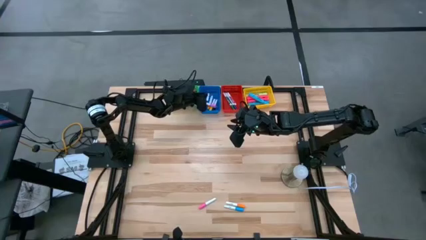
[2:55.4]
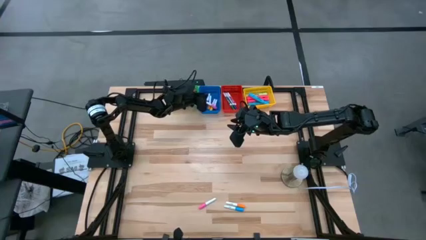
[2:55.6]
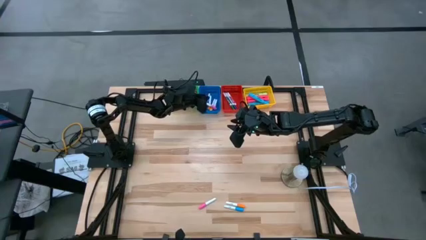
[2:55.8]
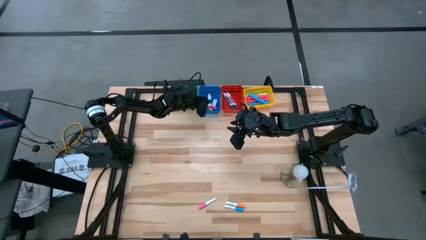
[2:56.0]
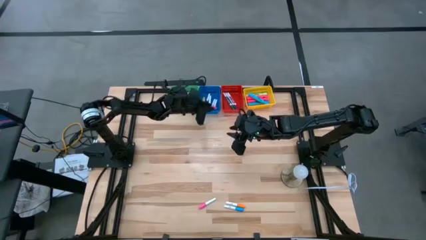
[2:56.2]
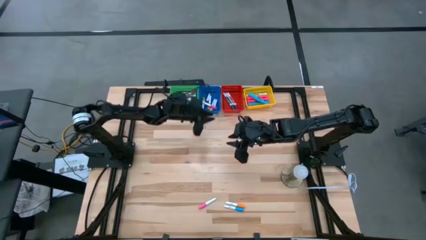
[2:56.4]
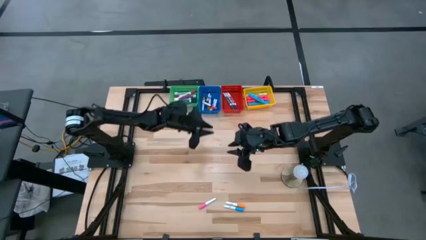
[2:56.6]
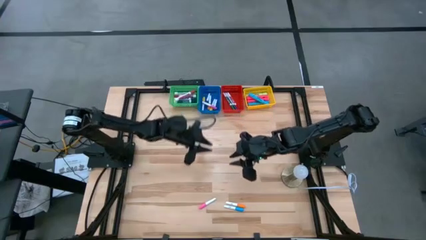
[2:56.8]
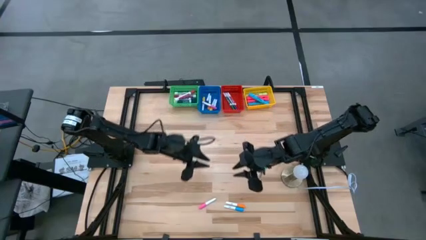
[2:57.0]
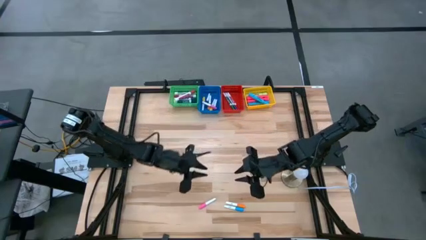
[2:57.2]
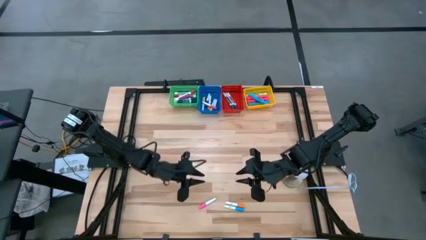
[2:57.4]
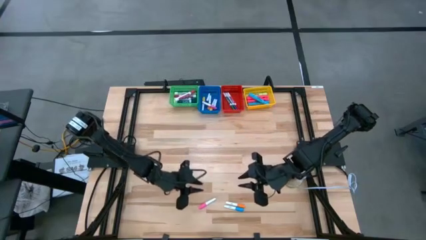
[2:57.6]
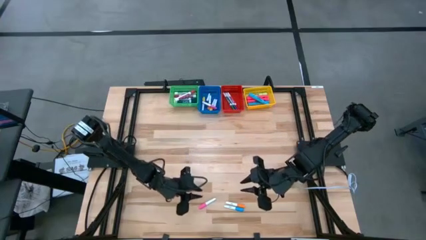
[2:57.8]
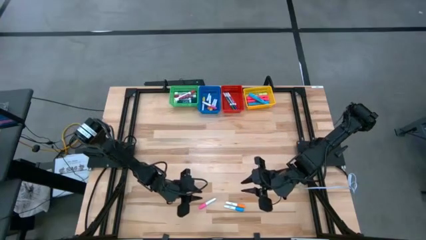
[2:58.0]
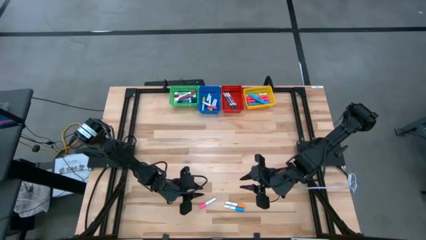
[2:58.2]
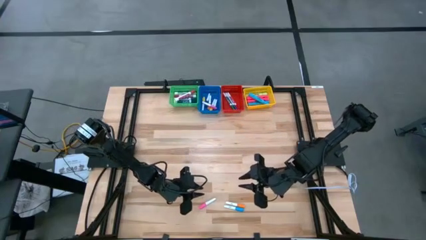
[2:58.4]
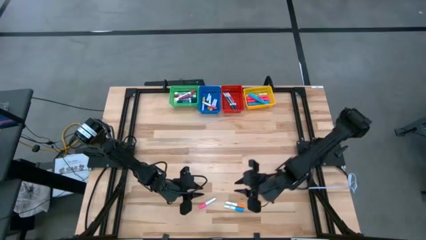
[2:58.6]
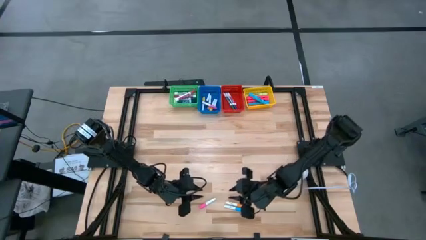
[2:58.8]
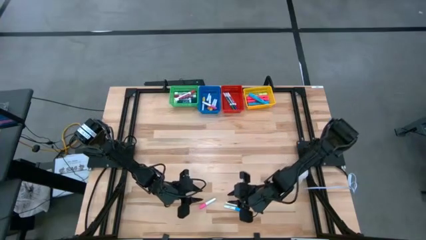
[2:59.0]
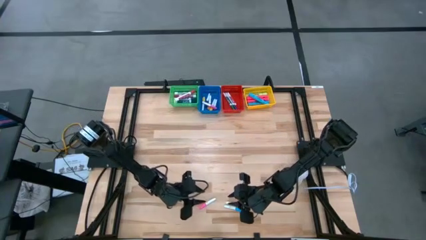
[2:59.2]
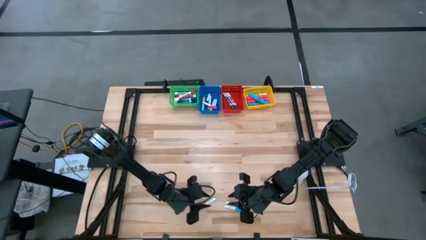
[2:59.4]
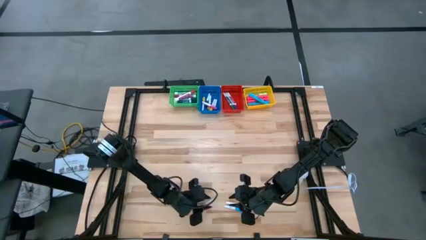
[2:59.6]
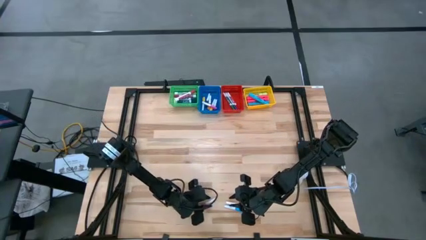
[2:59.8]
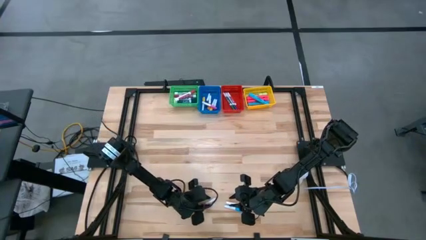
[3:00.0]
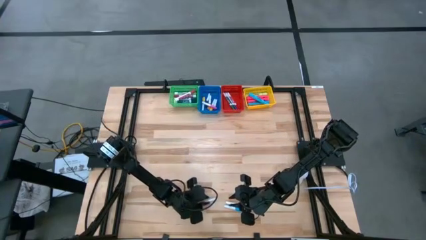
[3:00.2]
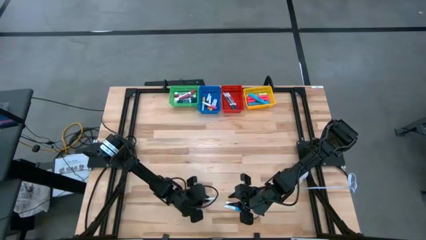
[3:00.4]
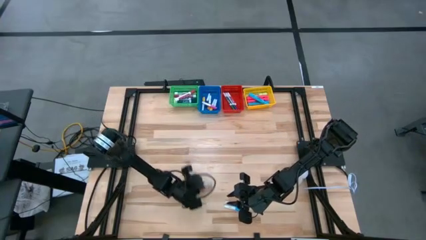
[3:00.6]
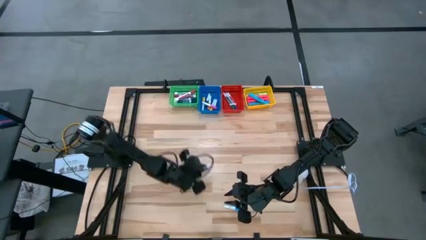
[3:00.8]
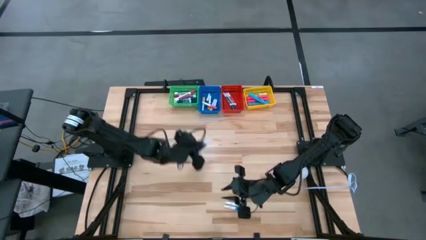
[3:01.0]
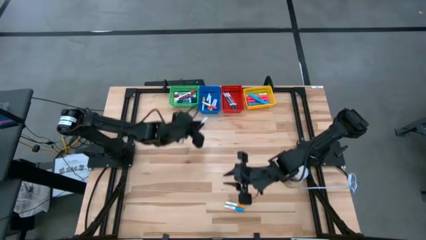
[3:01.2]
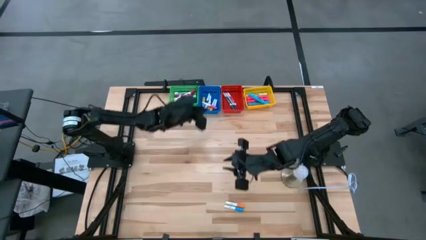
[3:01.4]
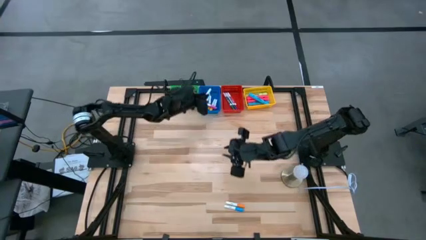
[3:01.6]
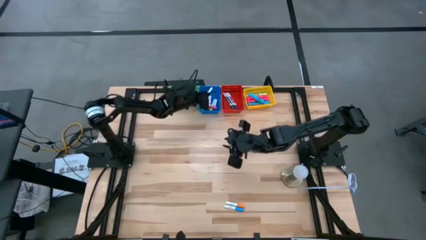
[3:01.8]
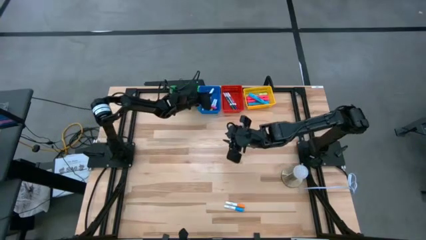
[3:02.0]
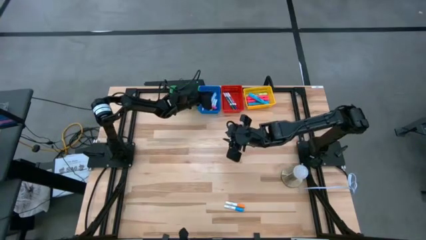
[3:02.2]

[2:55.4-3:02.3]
Task: Pick & Place Markers
Put the small pink highlighter pen into the blue bin

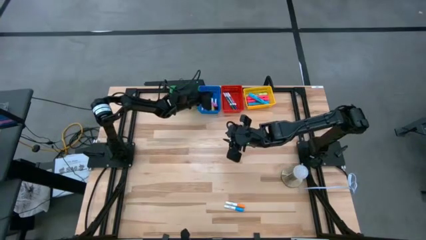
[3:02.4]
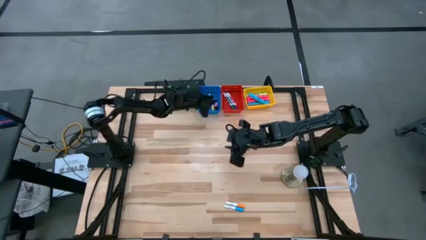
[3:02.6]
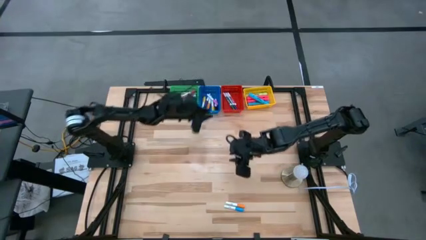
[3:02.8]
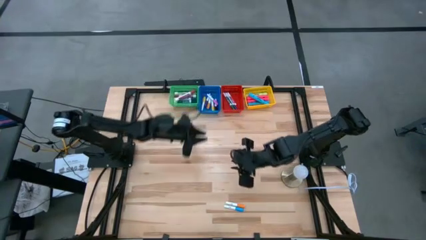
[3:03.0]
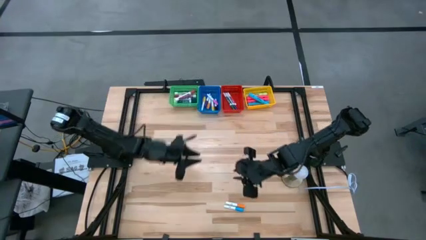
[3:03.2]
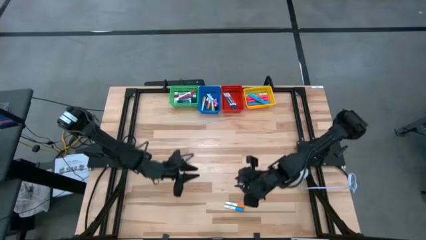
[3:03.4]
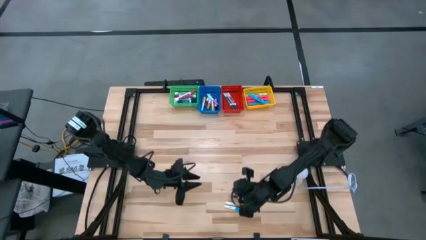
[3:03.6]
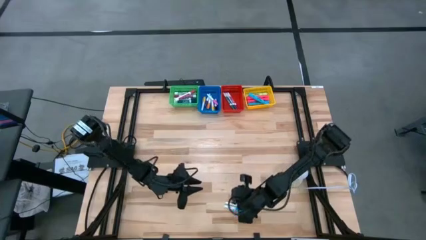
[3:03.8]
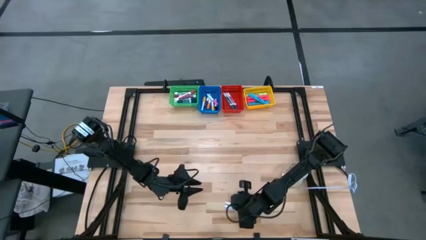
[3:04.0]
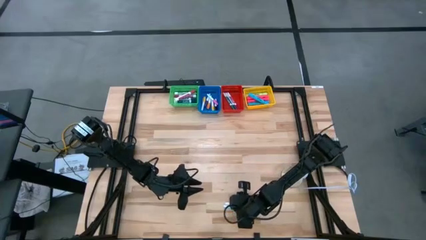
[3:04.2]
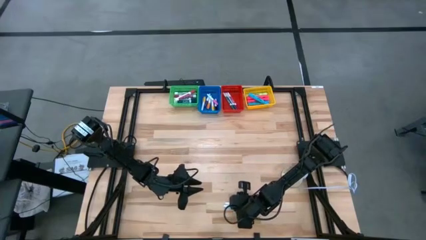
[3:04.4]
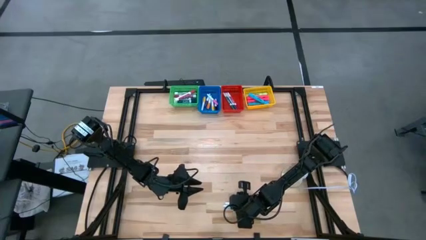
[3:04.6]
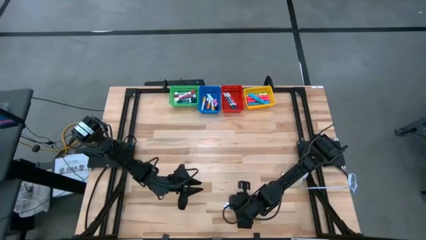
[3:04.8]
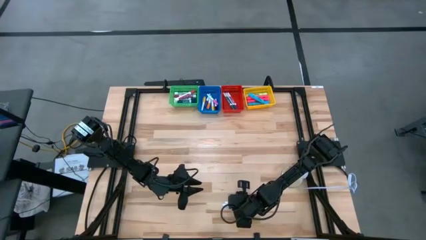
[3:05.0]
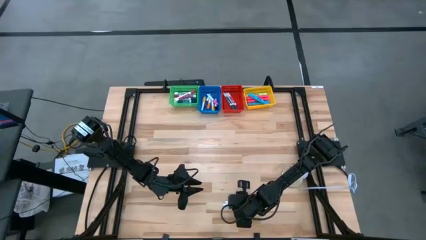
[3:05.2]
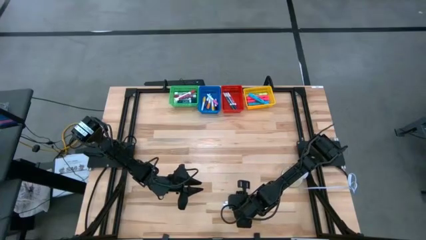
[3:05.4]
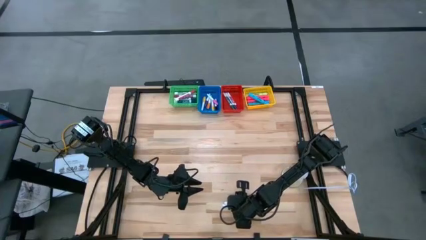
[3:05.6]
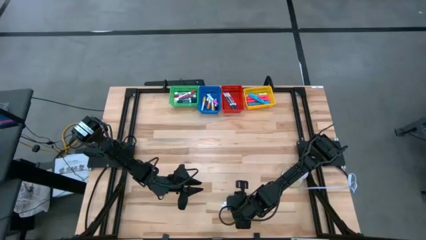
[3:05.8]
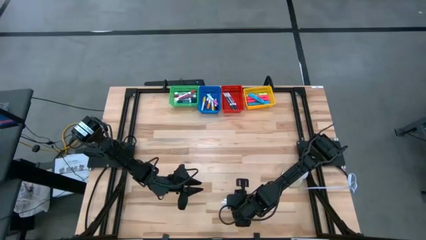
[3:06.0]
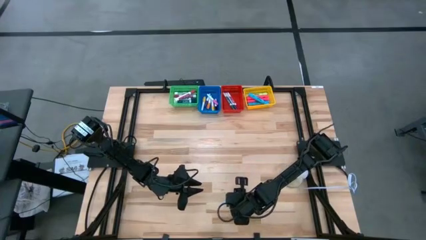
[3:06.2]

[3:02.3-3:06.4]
Put the small light blue highlighter pen into the blue bin

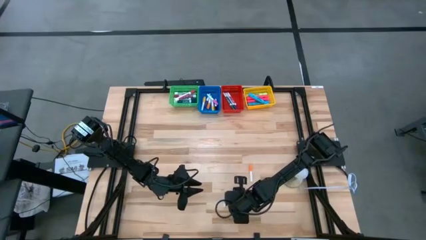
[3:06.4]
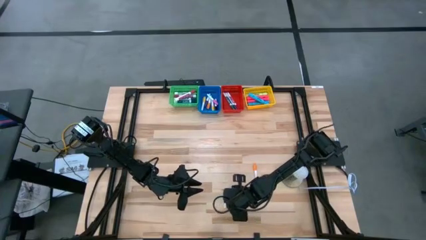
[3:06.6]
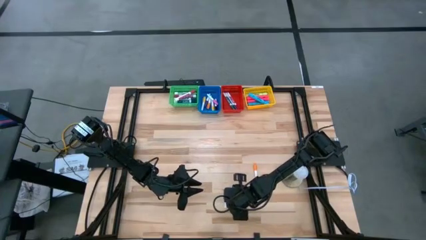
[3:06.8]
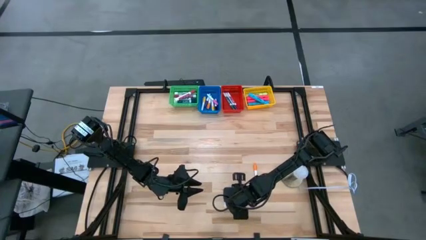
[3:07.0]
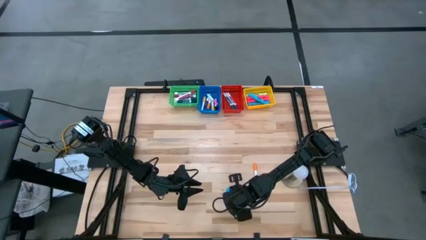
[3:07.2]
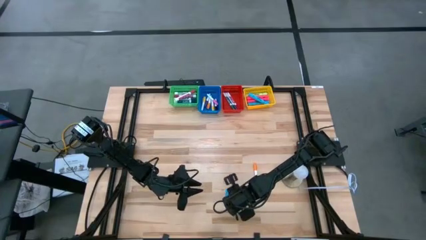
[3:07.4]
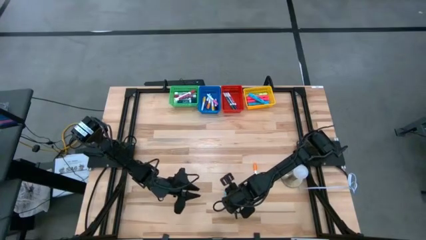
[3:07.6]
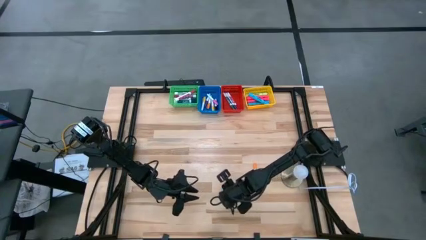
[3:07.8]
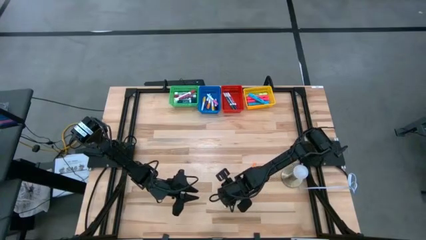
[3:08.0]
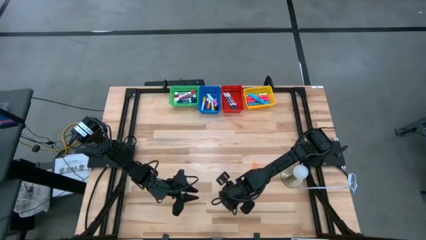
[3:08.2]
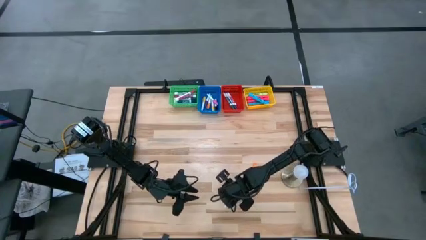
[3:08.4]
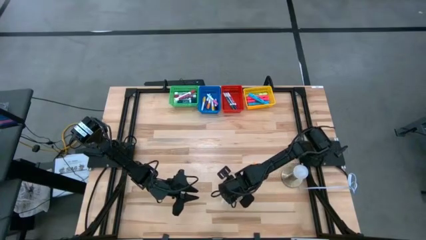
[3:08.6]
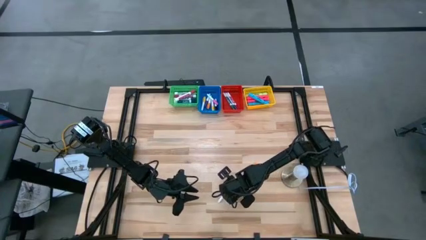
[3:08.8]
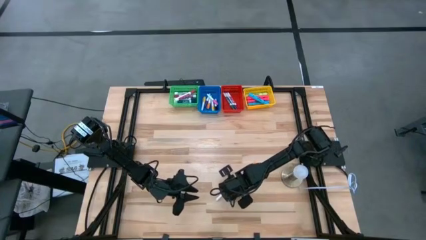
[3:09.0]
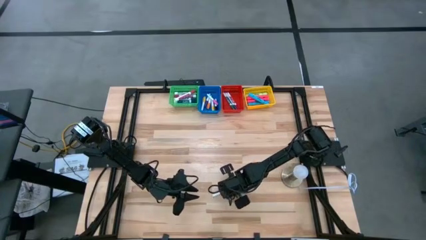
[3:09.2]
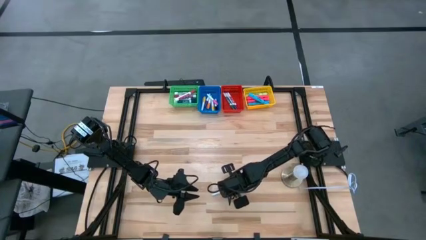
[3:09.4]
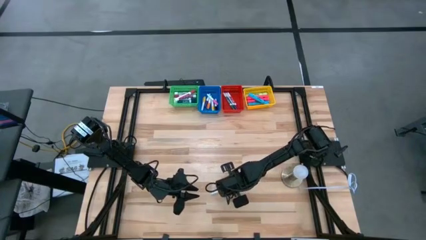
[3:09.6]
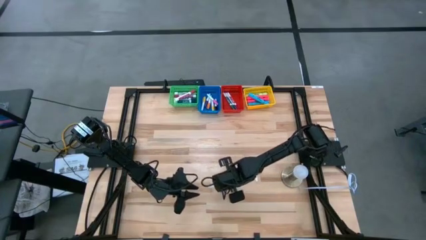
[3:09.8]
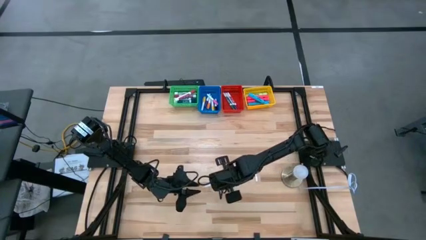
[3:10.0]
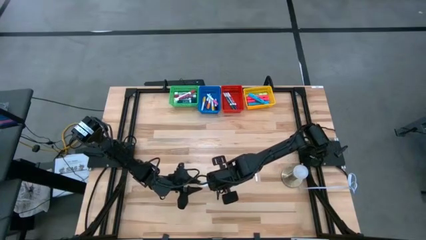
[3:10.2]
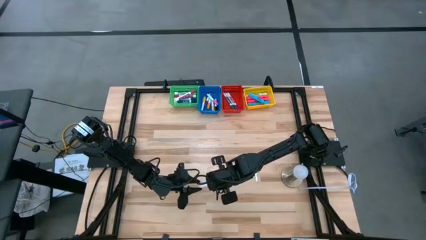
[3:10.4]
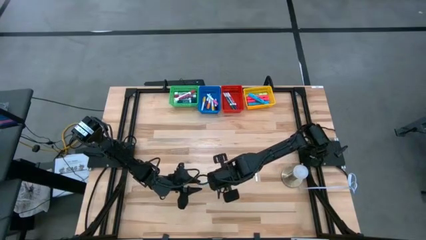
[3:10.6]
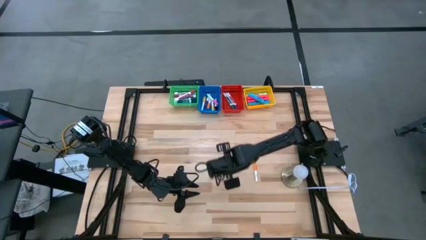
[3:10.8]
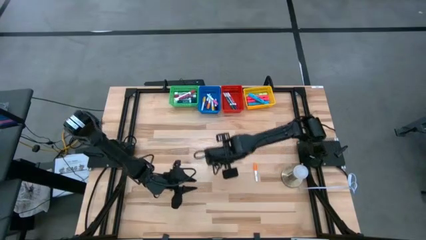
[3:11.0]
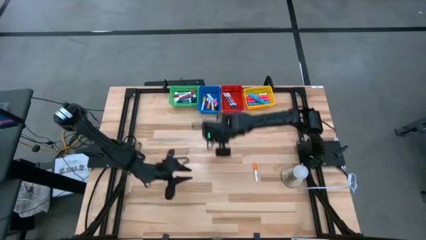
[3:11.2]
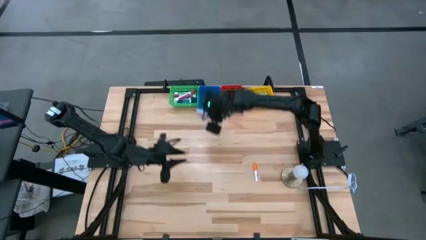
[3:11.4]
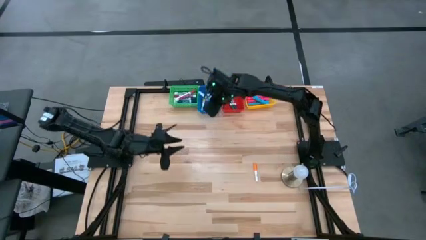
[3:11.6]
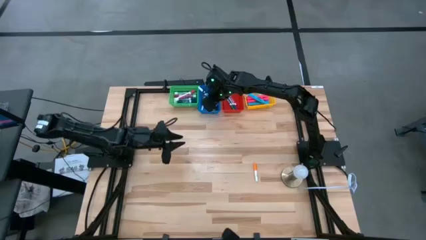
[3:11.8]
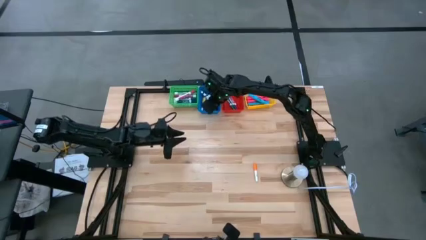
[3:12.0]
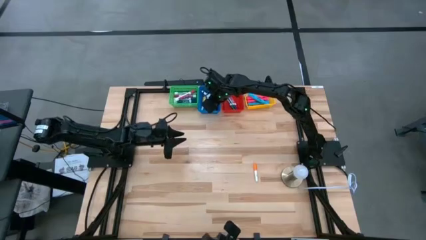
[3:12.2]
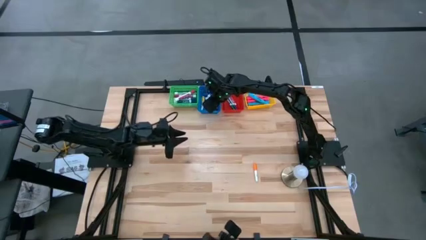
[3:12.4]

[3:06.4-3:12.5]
Put the small light blue highlighter pen into the blue bin
